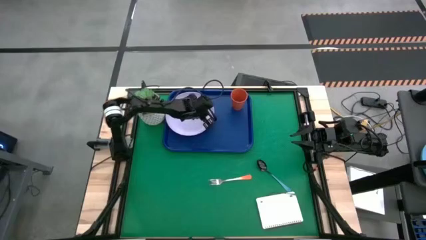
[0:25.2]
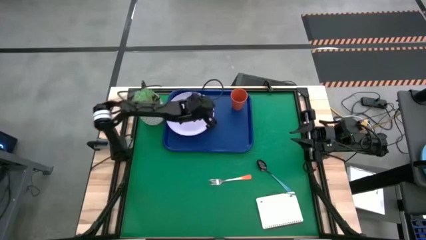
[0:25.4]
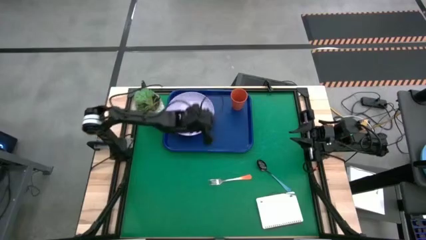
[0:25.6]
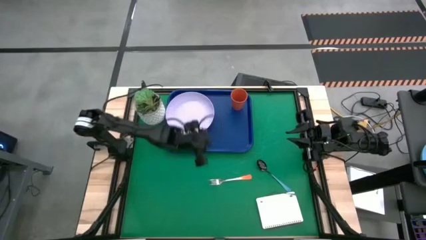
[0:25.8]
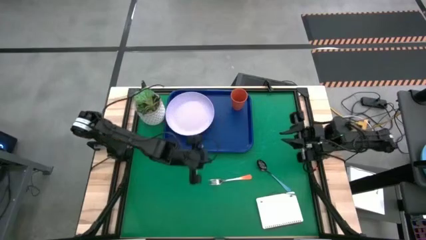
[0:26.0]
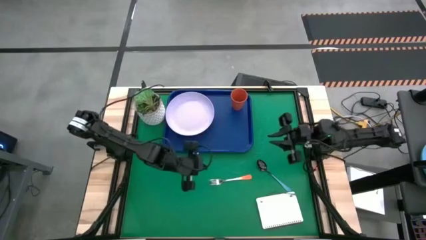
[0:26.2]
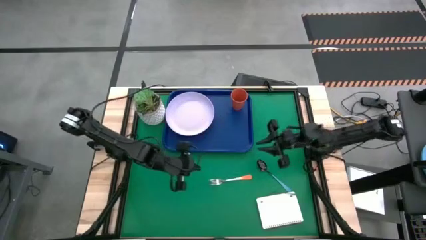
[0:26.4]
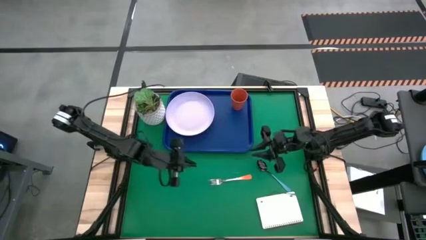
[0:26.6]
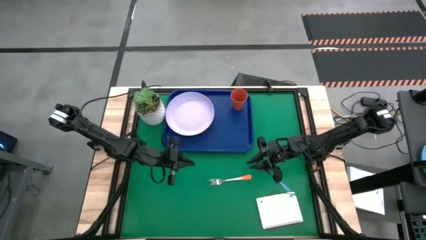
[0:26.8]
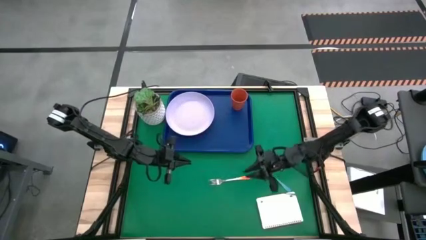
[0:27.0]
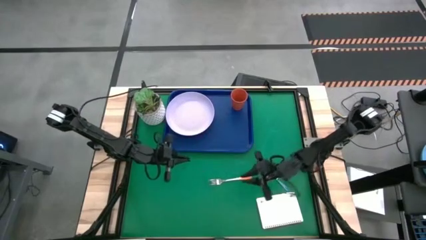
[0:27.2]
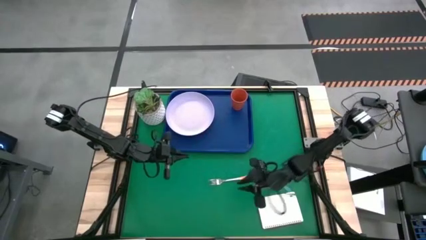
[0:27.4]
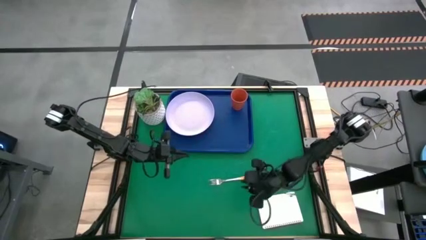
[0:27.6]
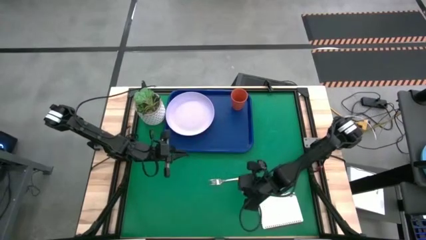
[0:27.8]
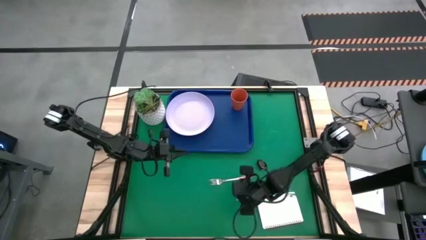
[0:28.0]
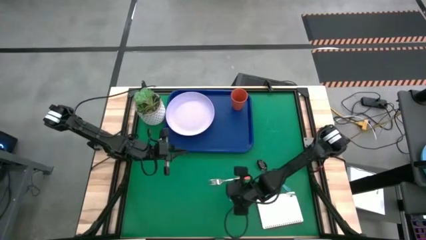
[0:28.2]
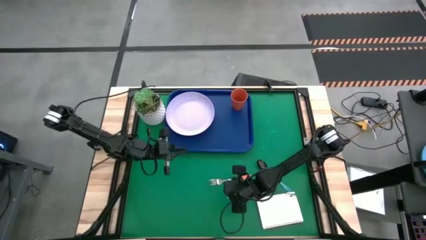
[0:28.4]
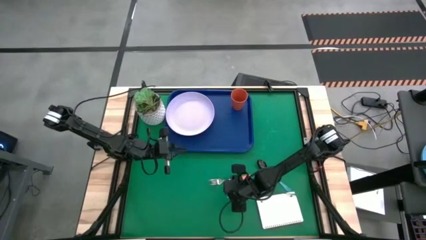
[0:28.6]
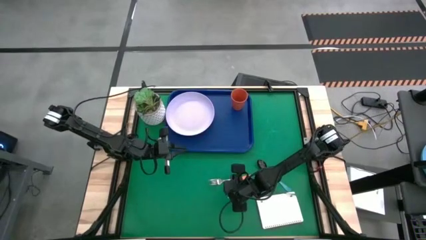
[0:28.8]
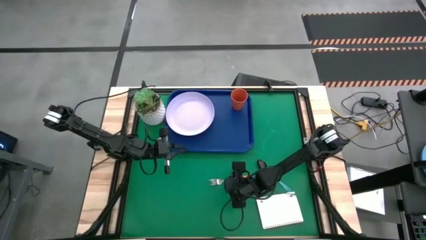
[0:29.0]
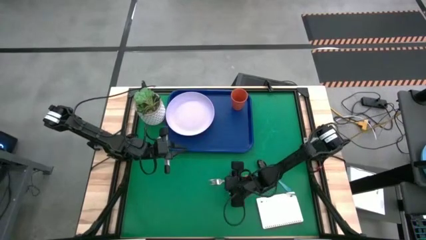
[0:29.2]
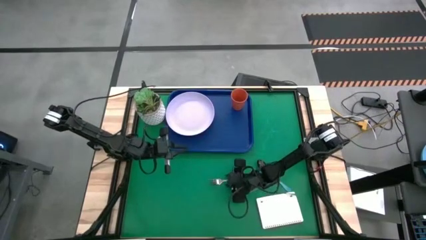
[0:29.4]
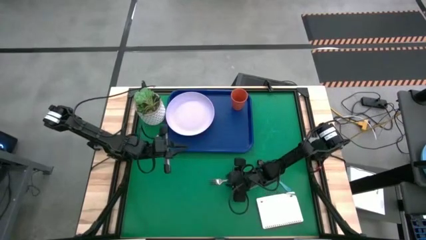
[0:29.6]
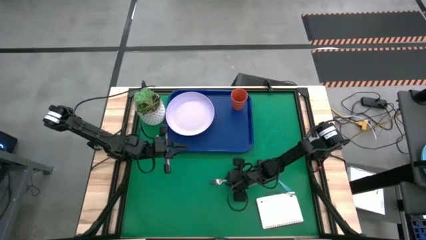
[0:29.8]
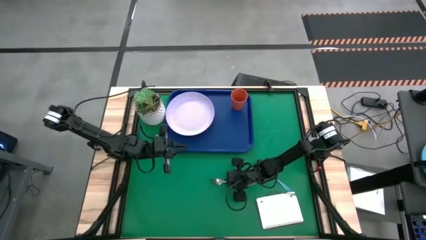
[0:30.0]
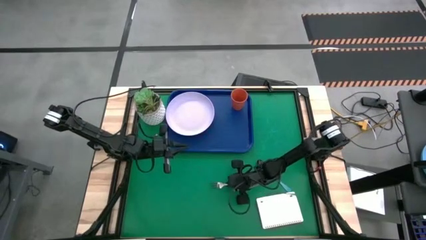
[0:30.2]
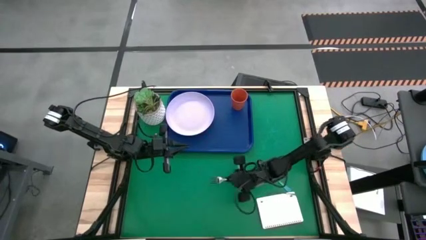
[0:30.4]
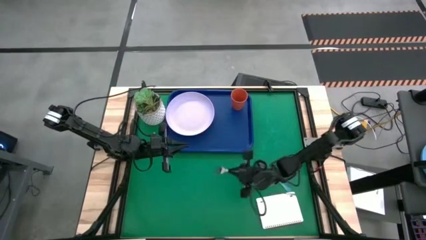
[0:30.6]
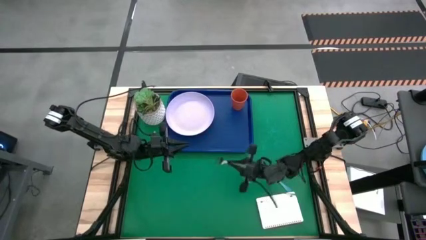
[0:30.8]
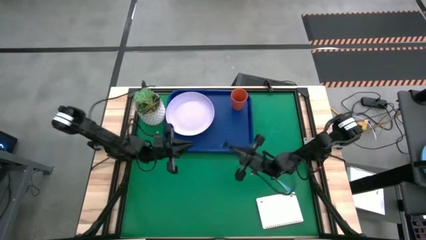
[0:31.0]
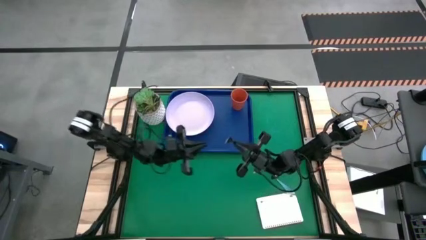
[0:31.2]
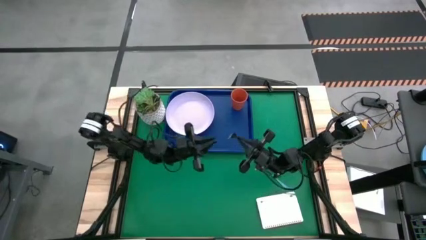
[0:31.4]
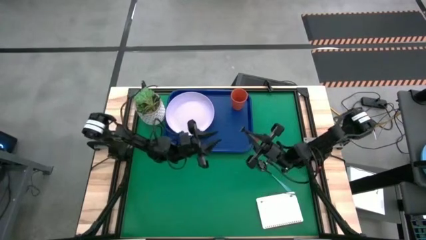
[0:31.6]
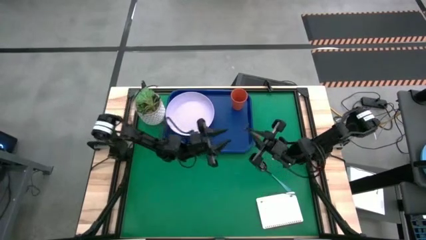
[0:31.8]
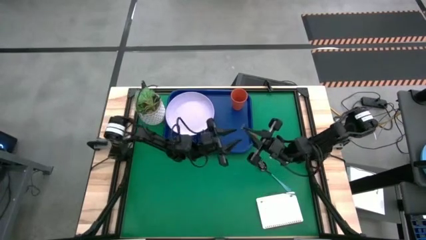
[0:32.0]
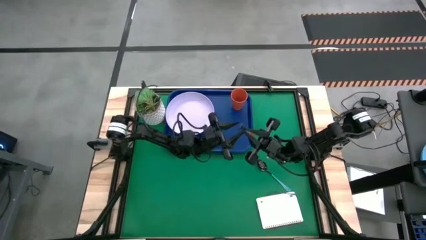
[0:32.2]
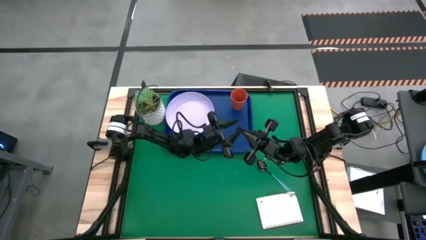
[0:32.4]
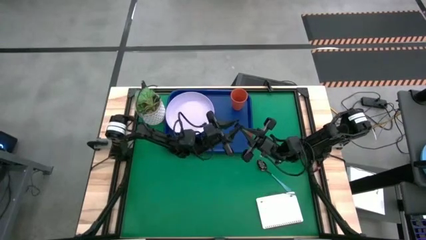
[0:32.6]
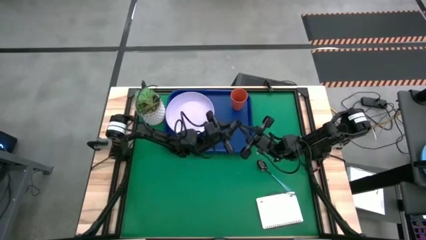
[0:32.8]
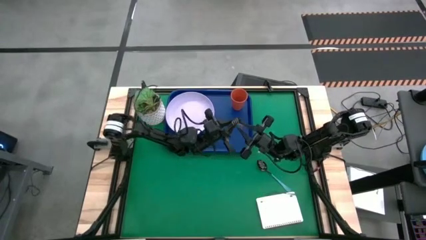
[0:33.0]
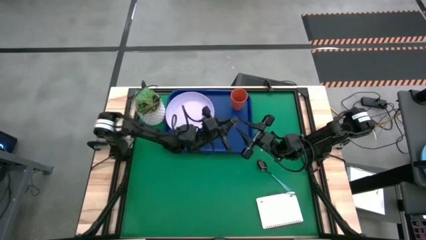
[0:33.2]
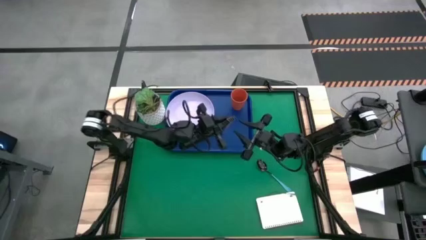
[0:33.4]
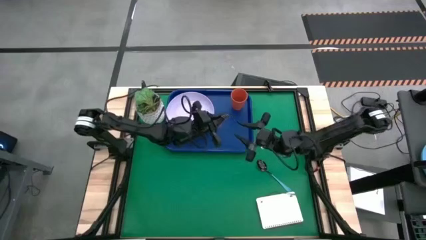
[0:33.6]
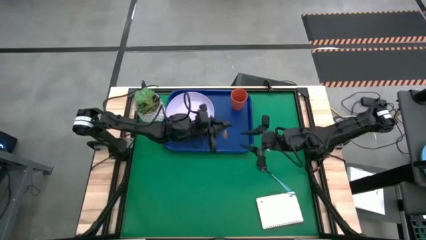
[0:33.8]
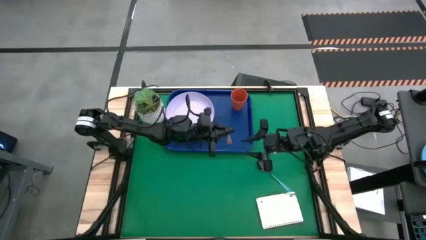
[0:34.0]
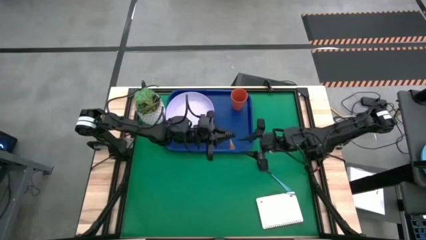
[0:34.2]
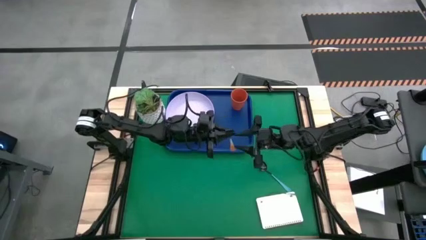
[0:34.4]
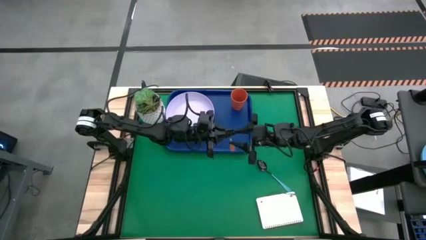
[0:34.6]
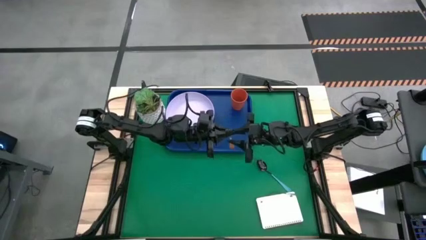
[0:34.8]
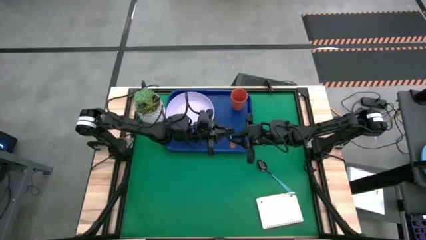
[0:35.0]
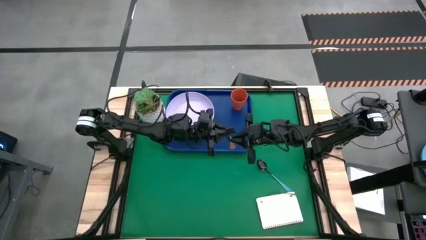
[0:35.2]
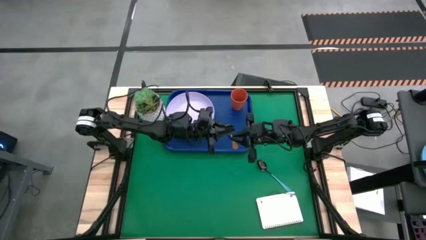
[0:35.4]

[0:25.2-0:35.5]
Task: Pick and place plate/cup/fork/spoon on tray
Put the orange fork on the blue serving tray to the right of the purple plate
